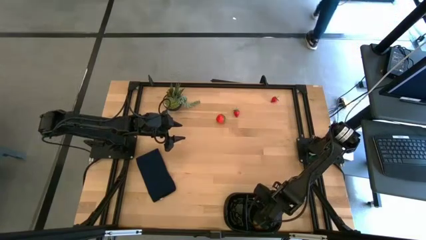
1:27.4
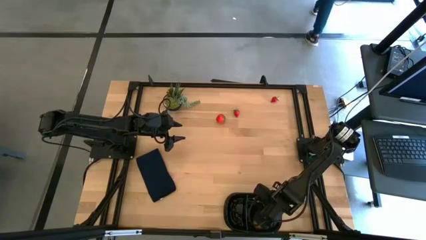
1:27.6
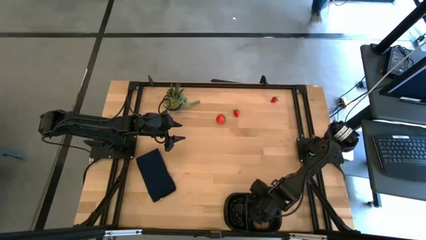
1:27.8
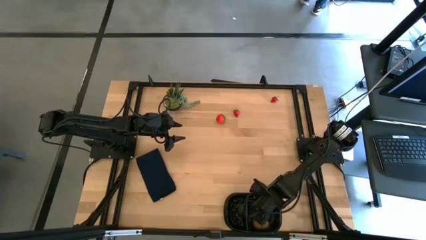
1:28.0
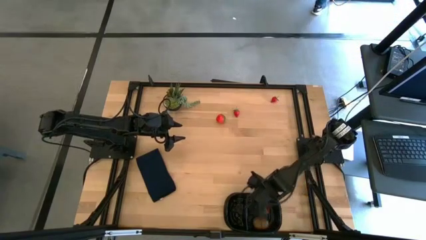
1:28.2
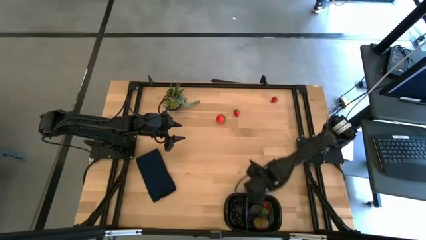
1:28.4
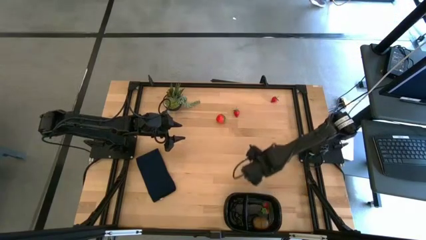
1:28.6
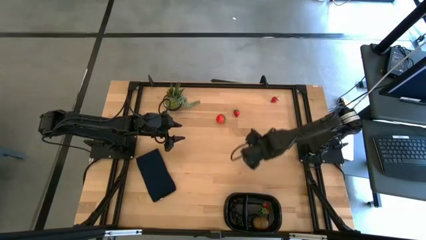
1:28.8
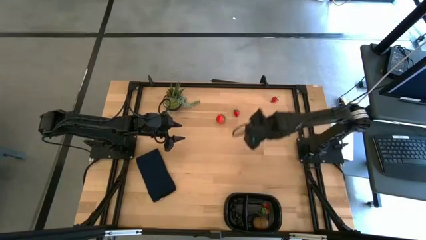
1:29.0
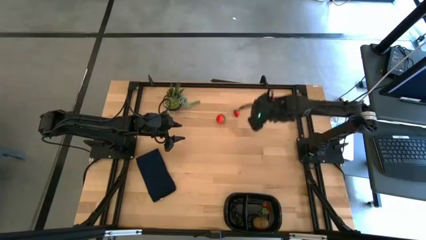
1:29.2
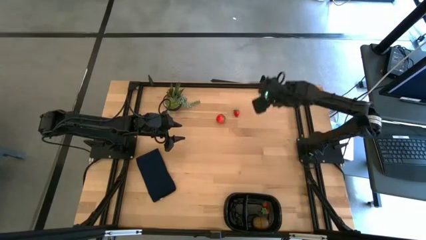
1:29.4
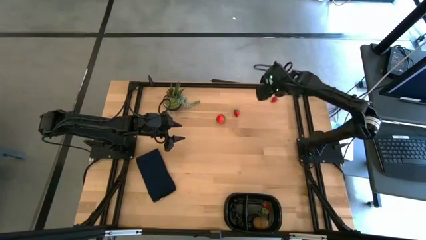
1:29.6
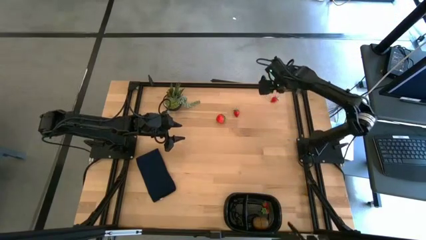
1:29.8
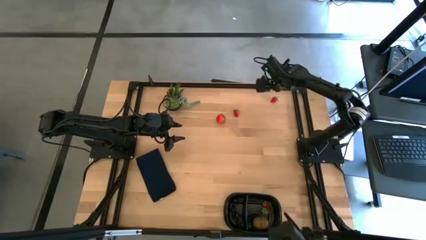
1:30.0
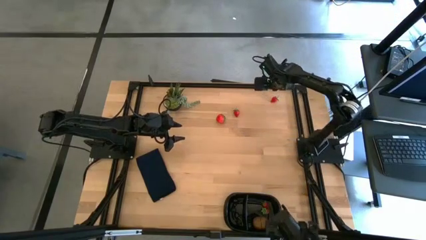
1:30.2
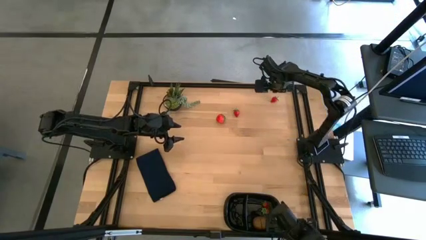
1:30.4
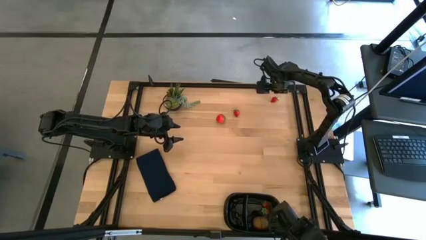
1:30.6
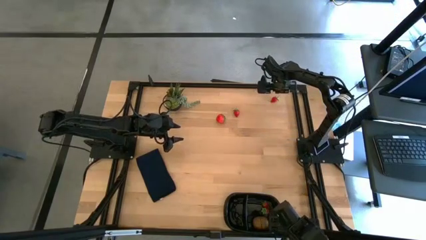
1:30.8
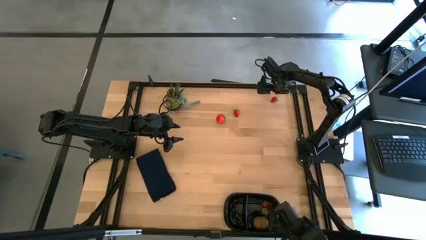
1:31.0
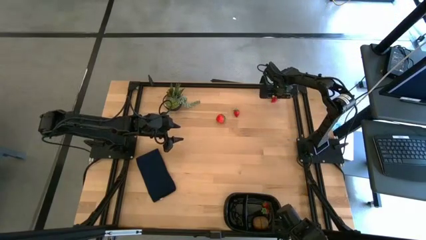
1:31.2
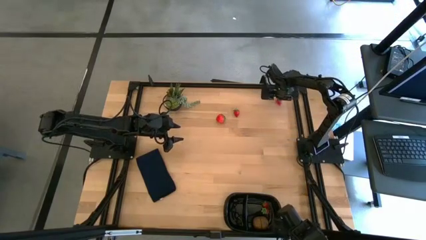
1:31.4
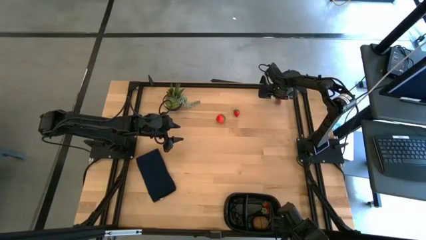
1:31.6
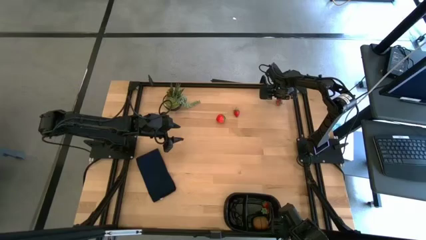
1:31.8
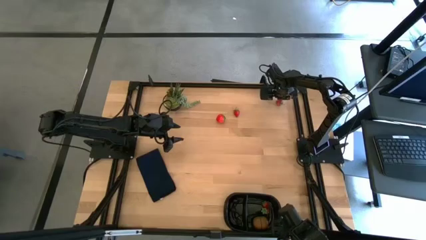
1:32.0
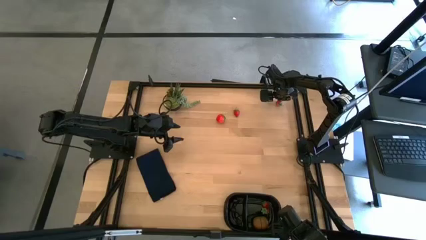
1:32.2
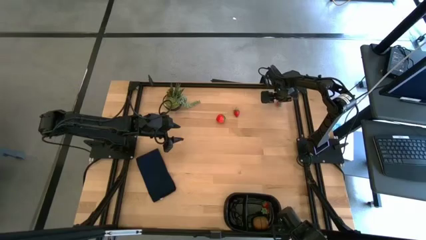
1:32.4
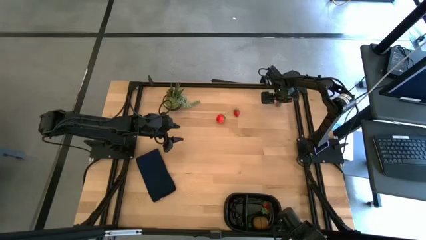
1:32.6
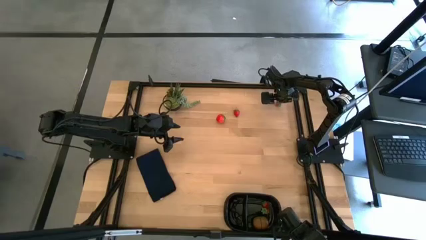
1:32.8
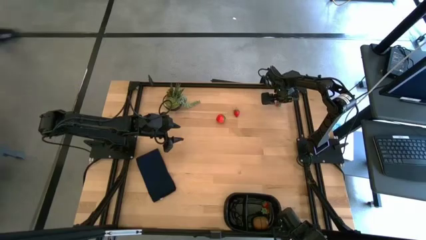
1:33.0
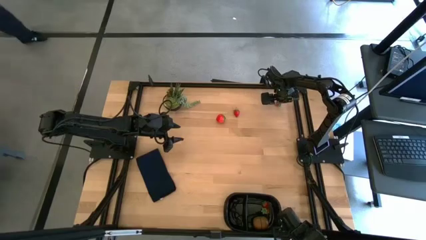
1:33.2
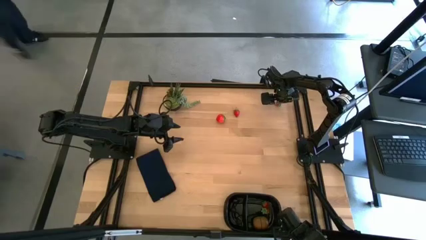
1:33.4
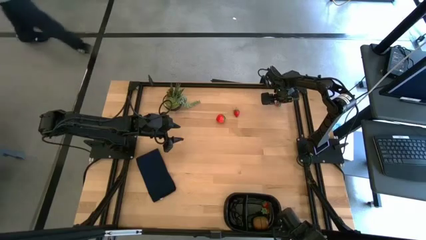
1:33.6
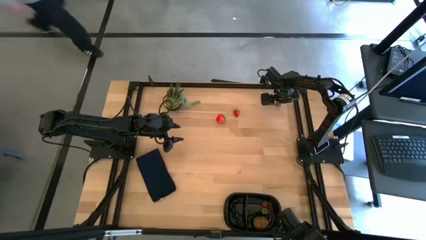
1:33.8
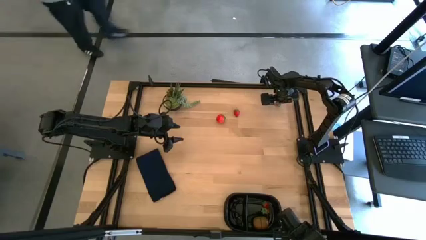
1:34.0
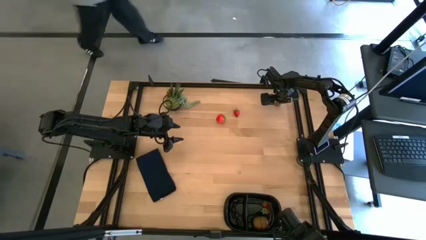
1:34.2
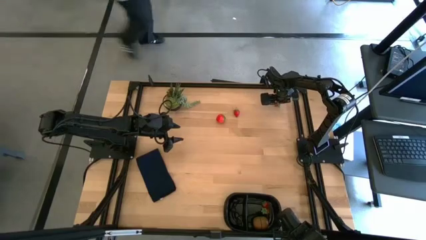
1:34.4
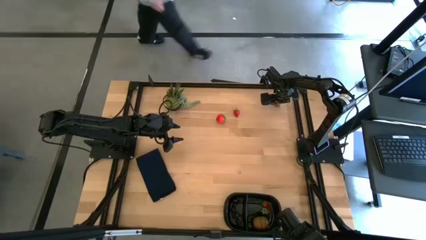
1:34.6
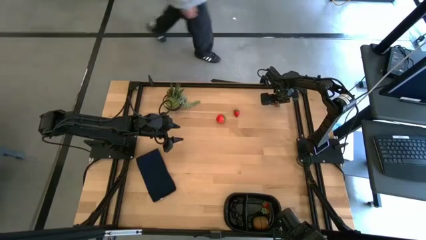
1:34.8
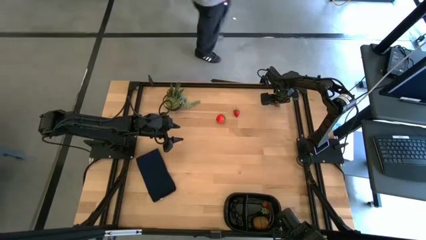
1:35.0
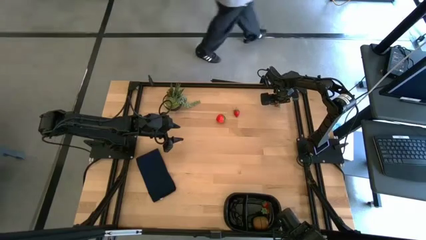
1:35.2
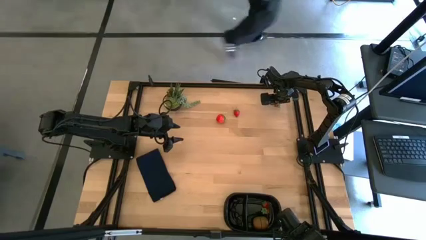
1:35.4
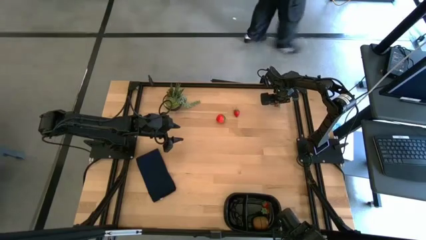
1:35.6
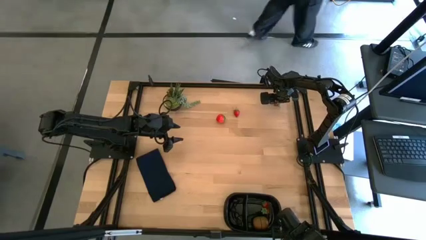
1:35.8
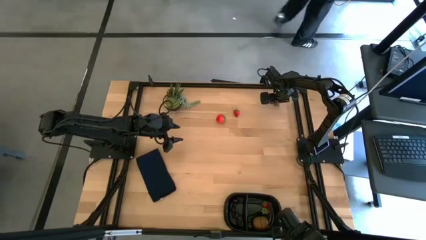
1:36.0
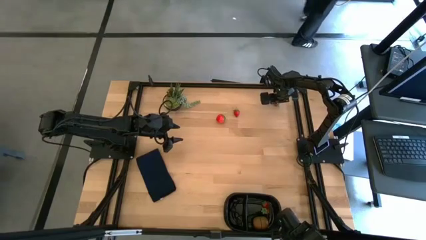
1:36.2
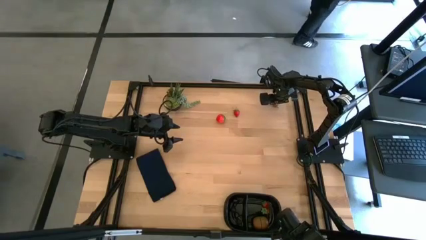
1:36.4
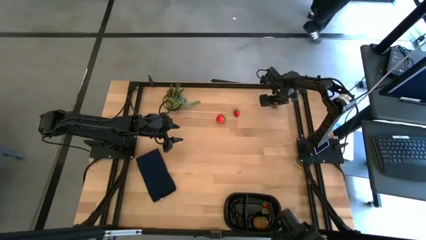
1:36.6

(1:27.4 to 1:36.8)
Task: Pick and placing Produce into tupperware
Put the small red strawberry into the black container

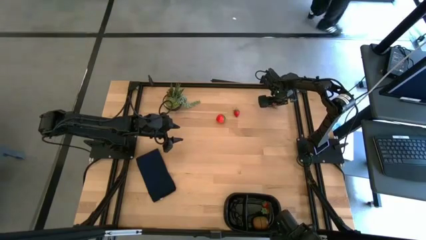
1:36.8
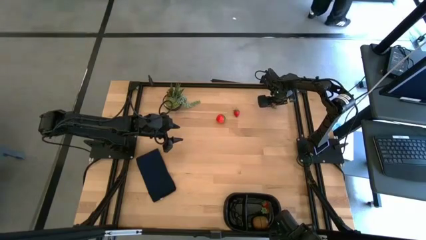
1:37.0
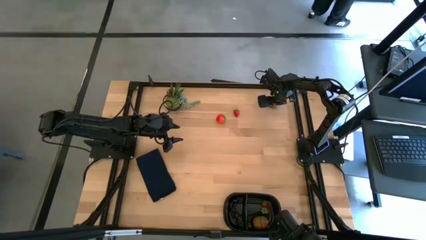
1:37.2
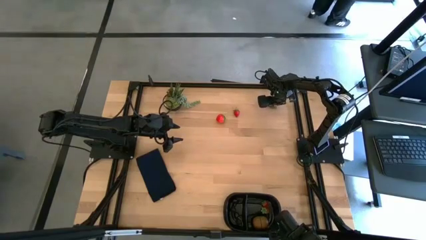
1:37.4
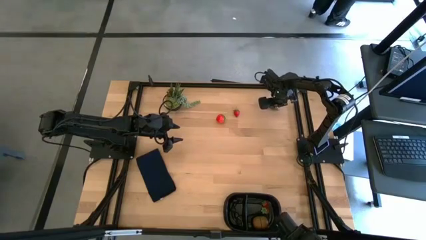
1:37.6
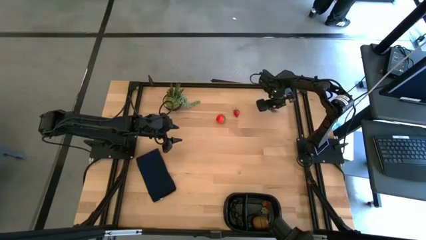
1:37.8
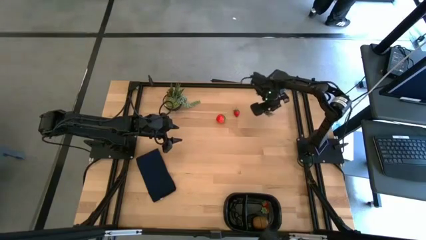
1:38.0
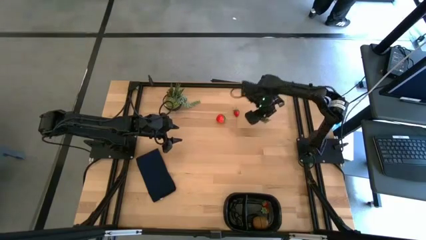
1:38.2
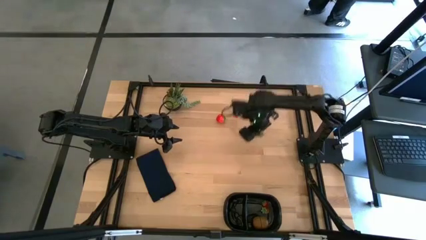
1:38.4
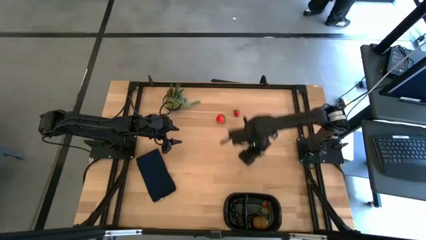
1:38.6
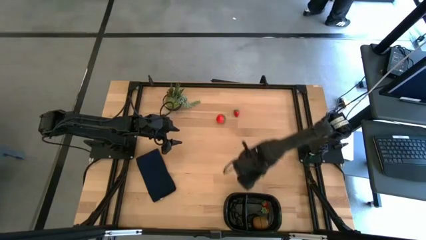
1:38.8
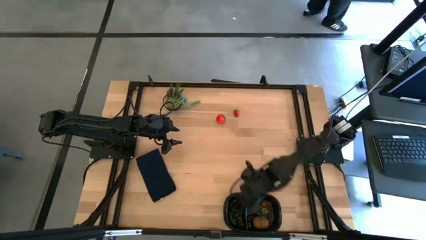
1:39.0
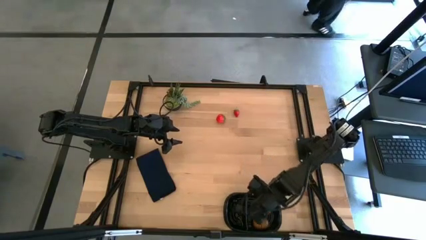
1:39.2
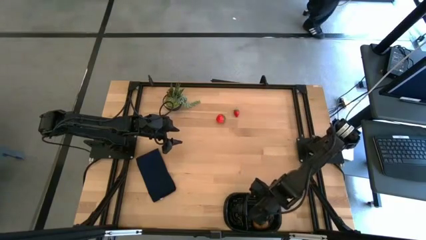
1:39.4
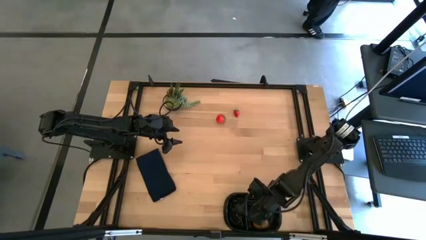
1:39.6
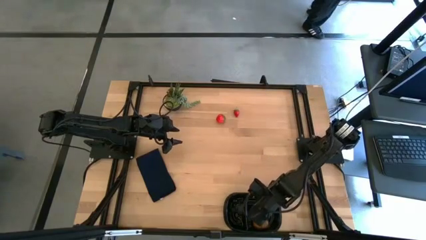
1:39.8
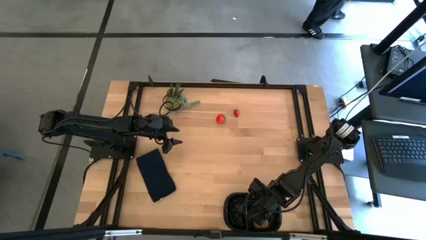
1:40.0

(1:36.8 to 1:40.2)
Put the small red strawberry into the black container
